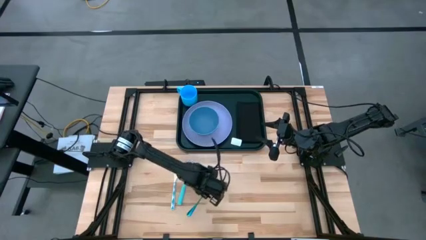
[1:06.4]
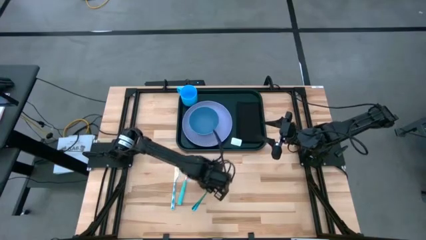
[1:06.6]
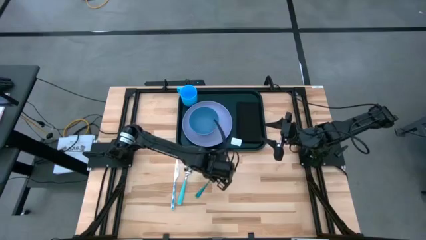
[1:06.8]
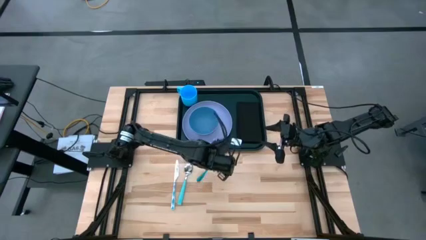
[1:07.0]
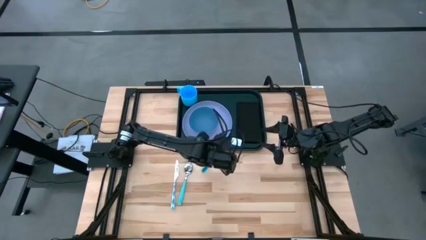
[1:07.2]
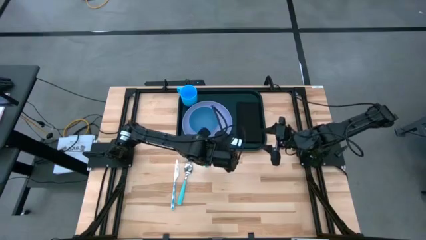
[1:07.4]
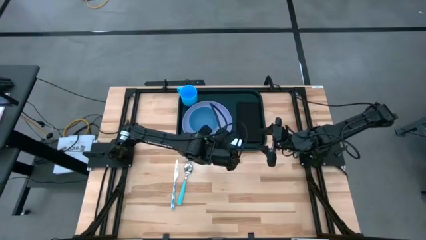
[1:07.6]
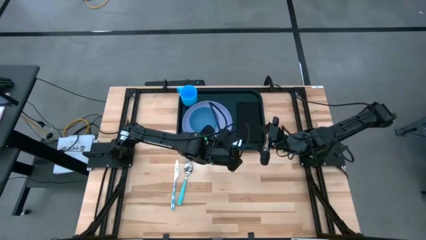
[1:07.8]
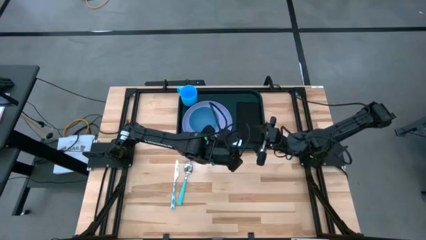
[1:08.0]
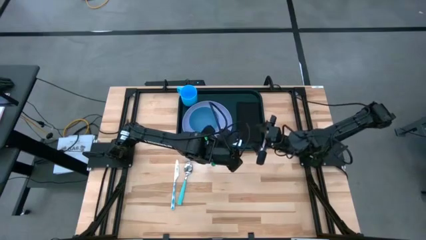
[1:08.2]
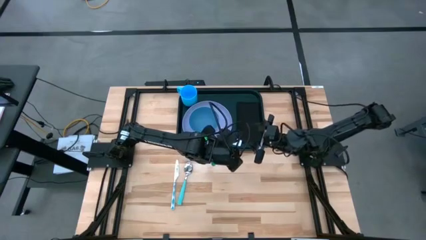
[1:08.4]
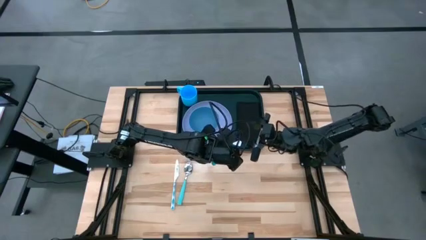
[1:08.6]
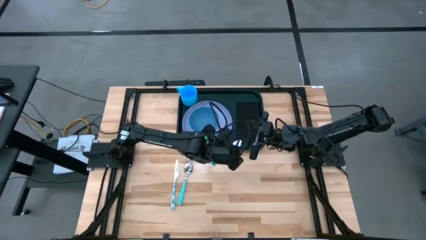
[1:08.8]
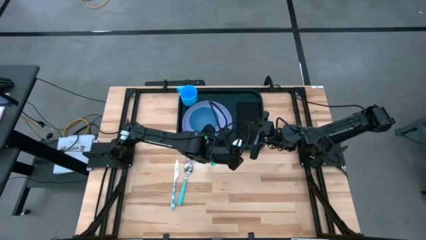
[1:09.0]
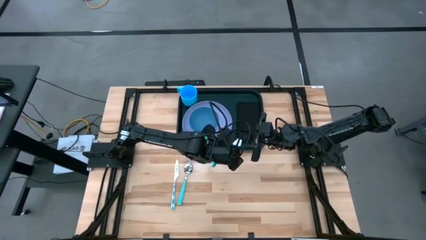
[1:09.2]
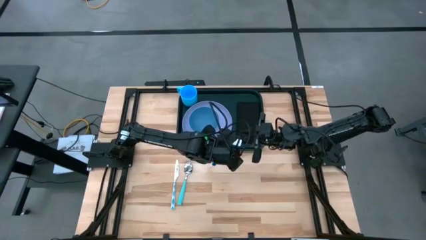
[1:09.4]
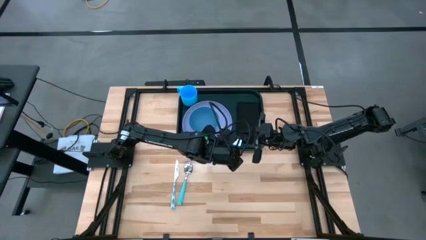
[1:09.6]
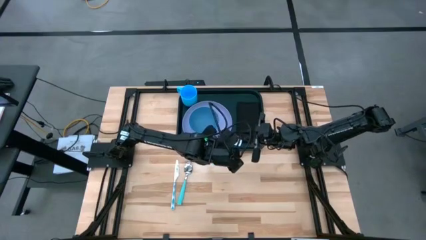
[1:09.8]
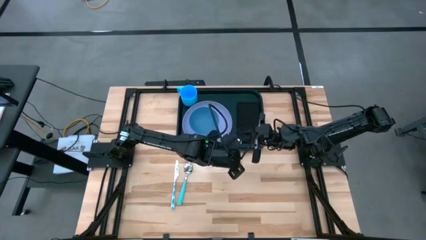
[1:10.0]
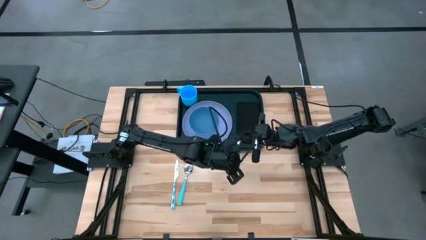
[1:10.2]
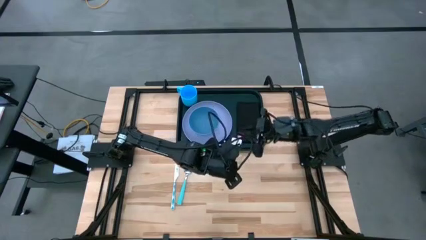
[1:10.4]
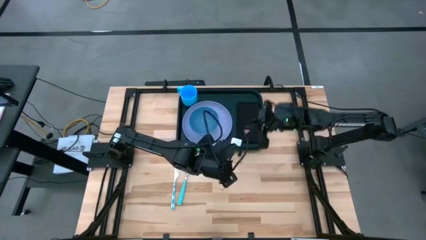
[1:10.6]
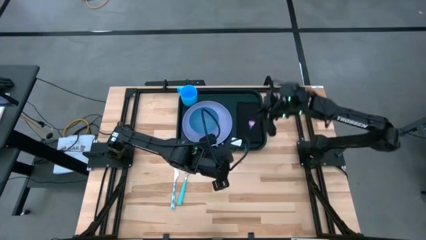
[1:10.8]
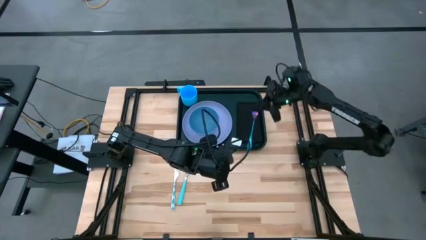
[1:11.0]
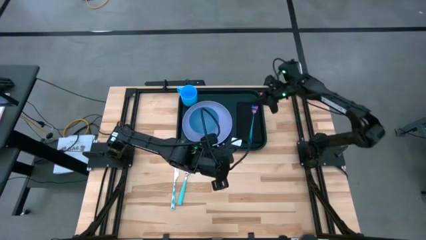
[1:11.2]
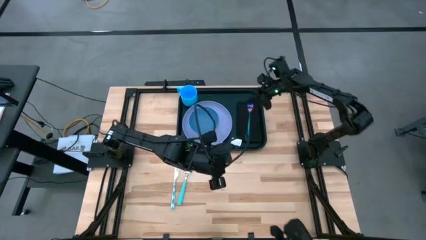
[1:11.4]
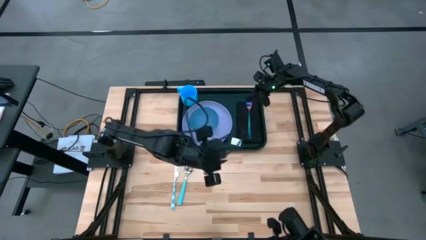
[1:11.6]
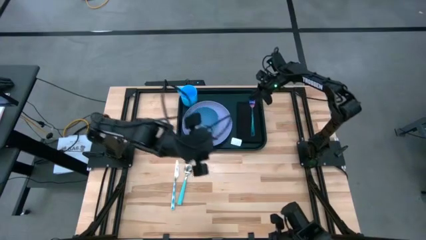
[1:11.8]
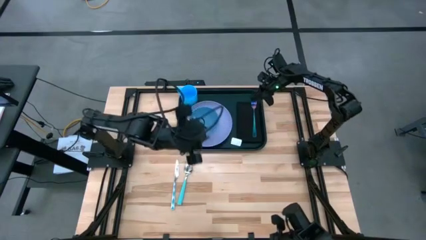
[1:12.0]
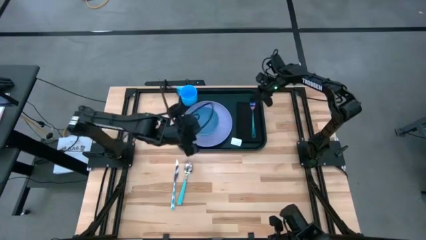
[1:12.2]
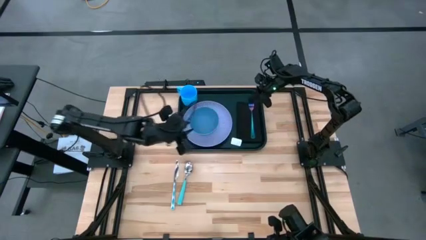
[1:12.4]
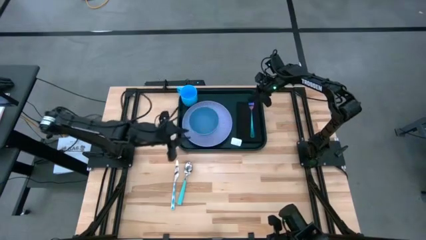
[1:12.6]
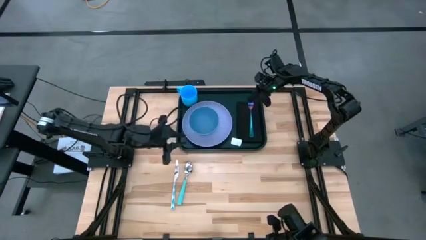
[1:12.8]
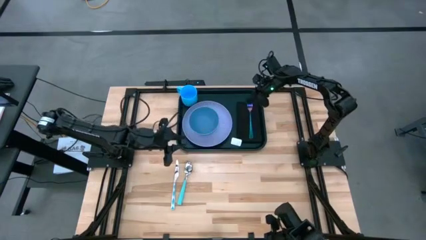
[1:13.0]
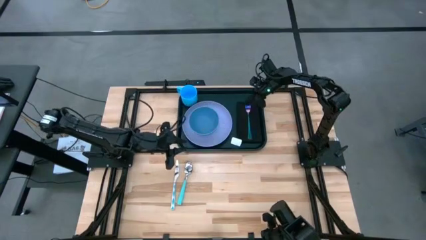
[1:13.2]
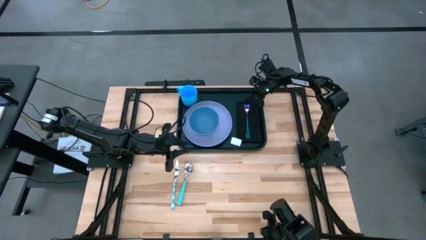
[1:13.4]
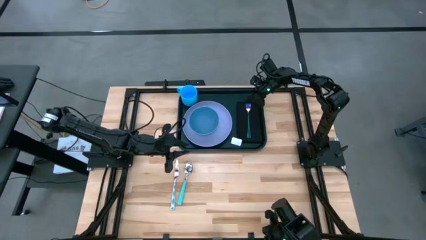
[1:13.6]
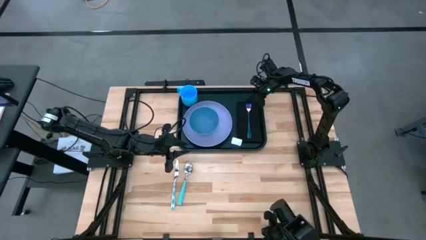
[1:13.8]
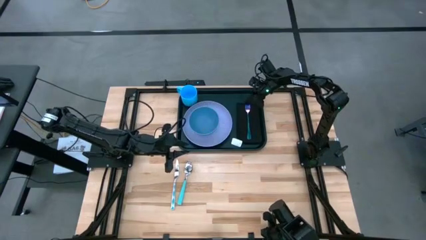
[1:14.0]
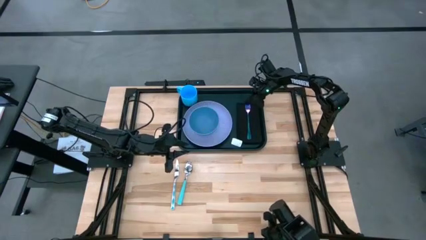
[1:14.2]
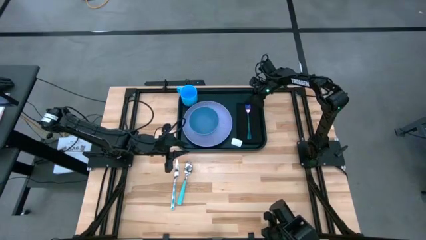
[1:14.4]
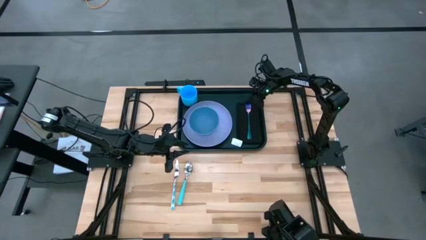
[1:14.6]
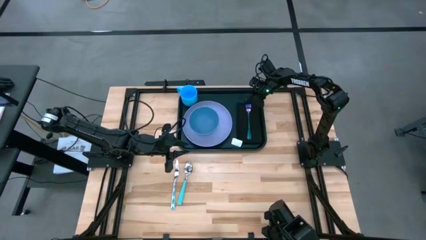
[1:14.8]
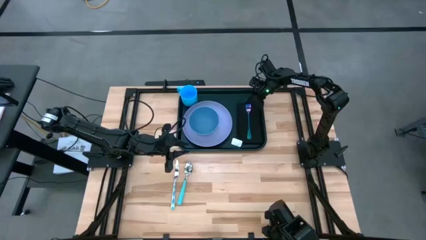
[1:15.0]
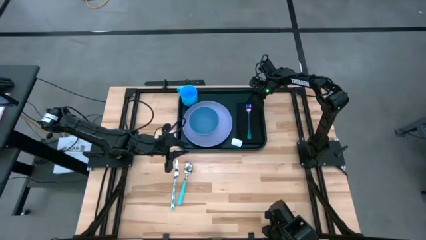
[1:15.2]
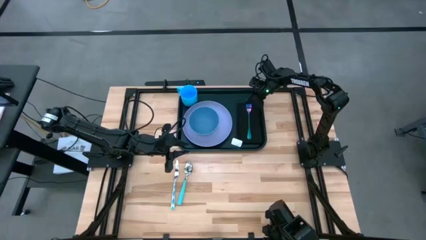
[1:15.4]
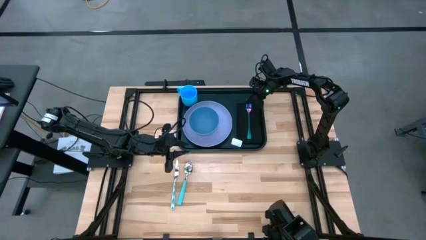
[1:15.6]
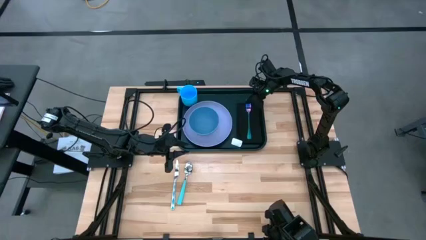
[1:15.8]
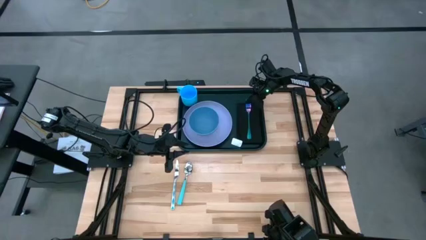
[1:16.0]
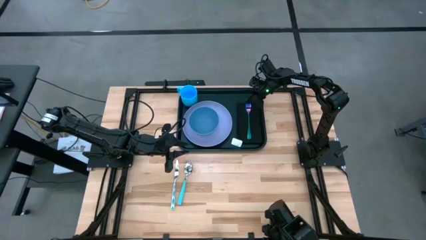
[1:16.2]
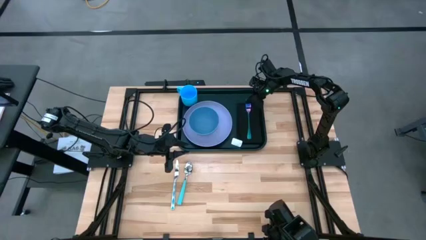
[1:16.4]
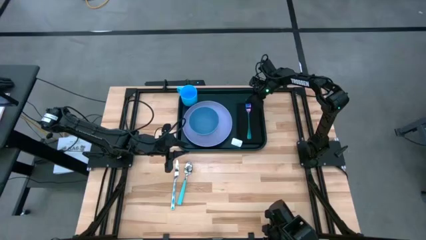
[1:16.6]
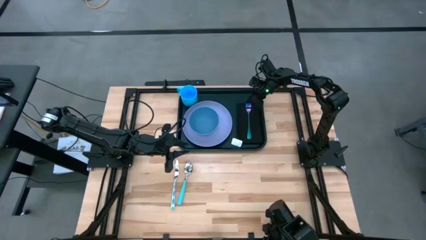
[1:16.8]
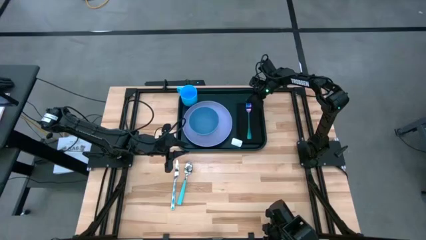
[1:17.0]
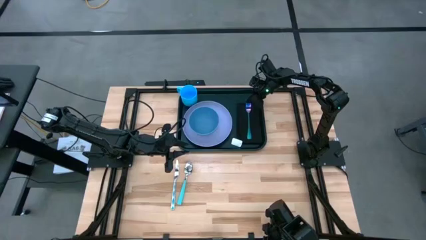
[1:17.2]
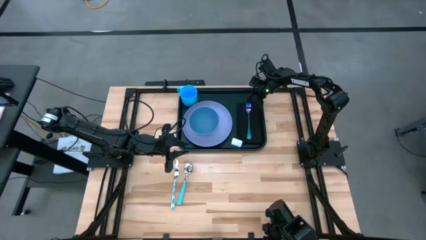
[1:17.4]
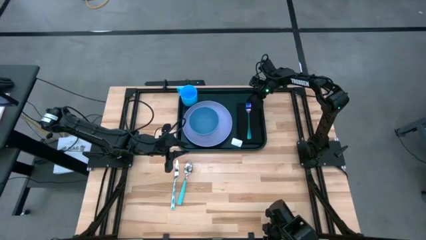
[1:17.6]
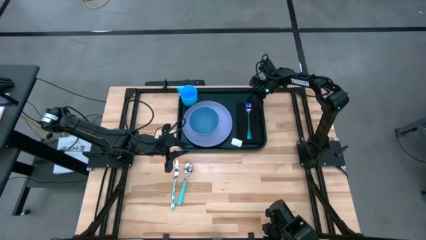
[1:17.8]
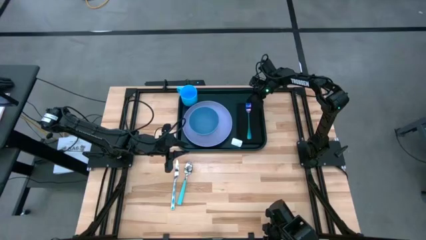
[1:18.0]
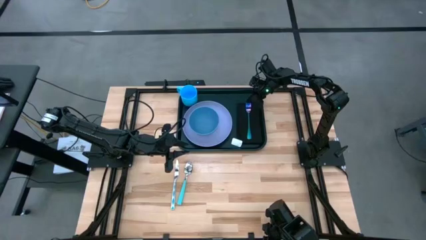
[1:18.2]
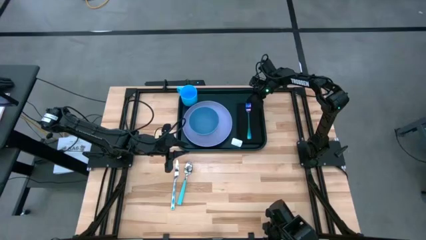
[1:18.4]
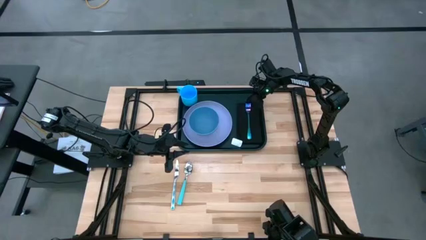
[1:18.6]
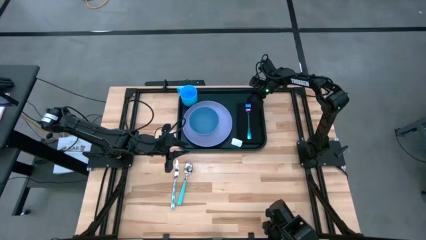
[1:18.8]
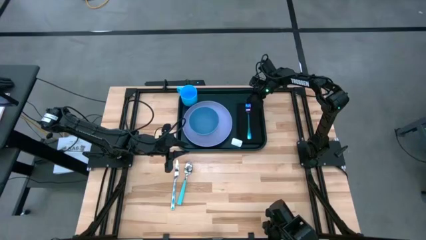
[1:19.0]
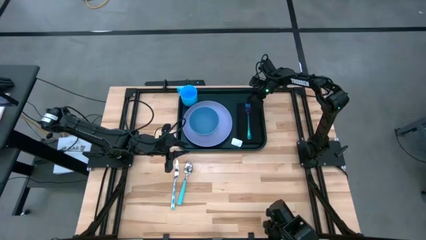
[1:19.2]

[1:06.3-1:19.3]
Task: Set up tray
Put the blue fork on top of the black napkin on the black tray

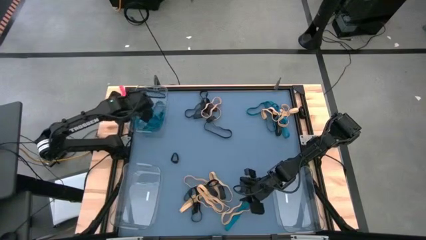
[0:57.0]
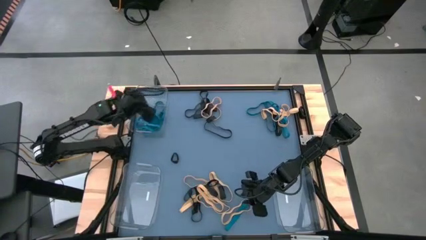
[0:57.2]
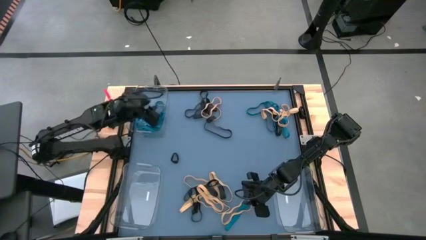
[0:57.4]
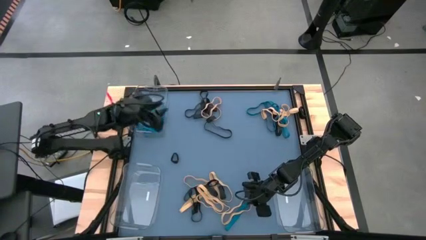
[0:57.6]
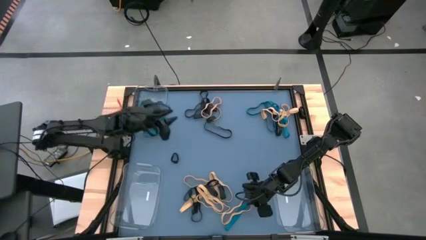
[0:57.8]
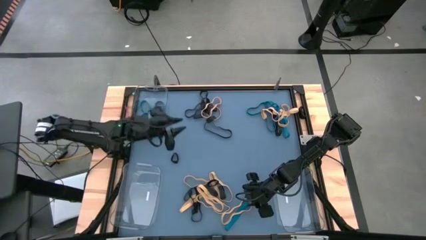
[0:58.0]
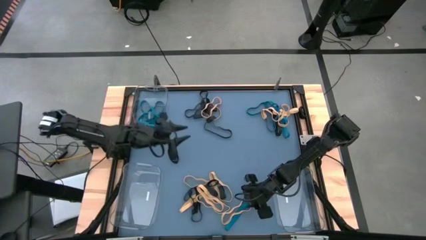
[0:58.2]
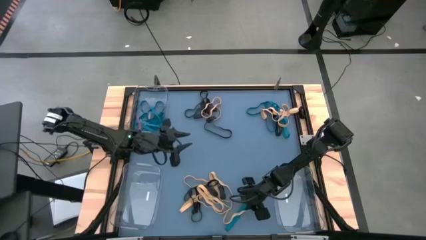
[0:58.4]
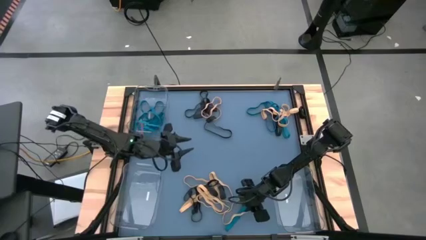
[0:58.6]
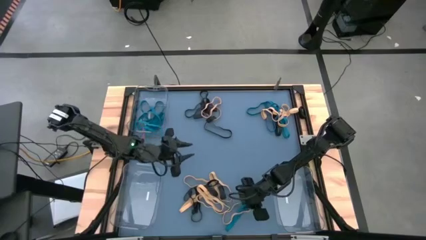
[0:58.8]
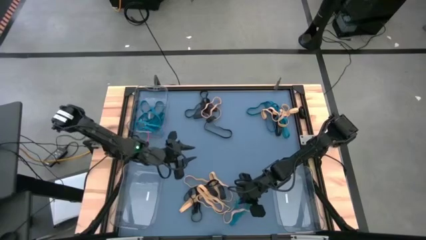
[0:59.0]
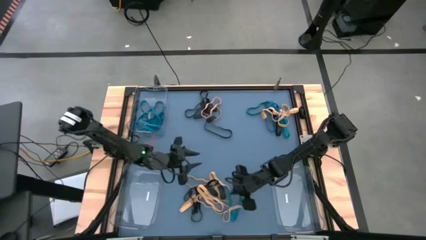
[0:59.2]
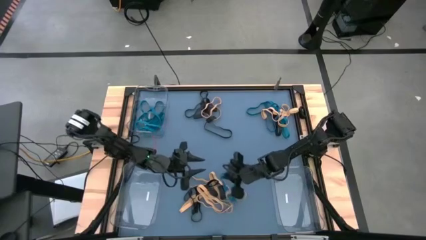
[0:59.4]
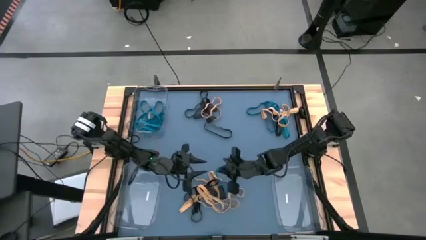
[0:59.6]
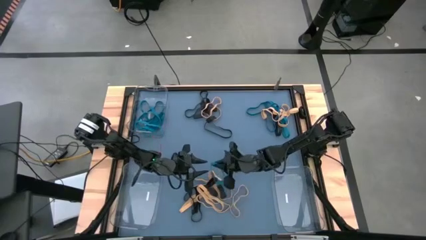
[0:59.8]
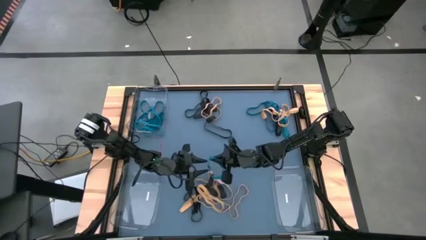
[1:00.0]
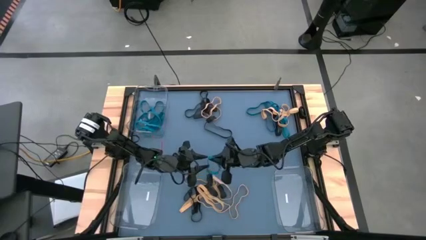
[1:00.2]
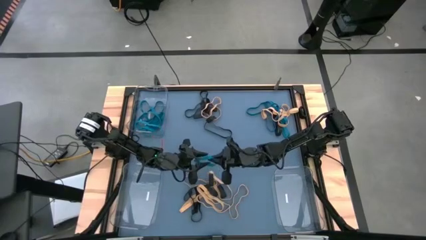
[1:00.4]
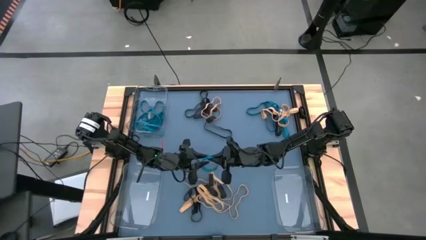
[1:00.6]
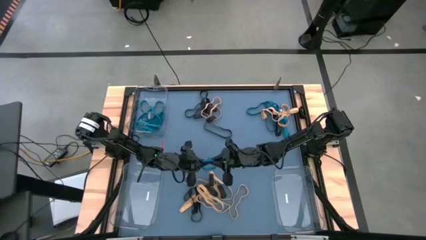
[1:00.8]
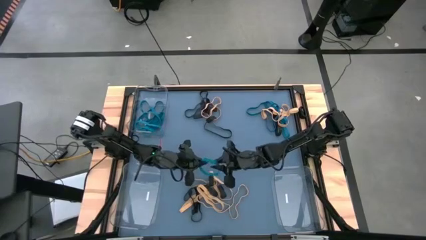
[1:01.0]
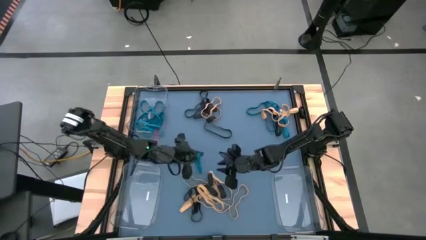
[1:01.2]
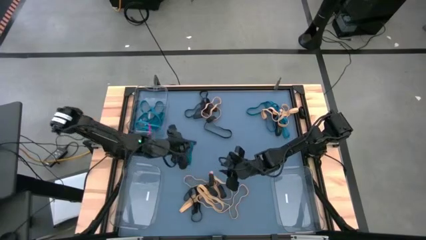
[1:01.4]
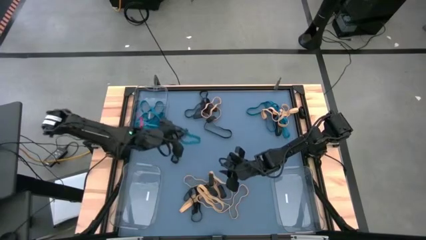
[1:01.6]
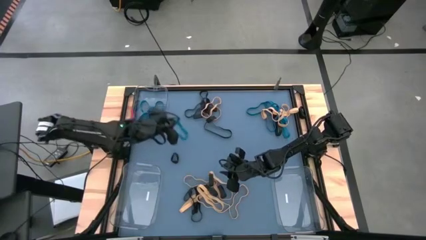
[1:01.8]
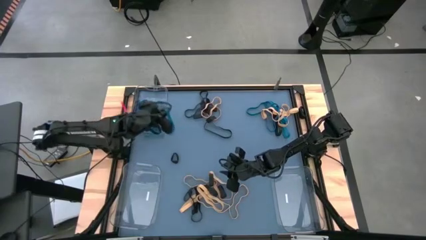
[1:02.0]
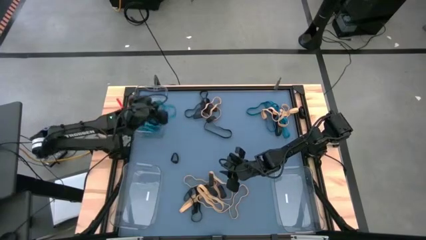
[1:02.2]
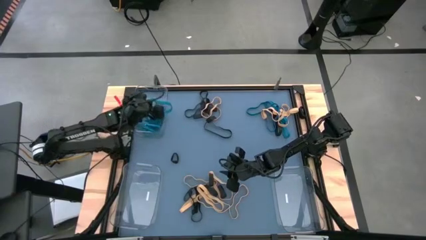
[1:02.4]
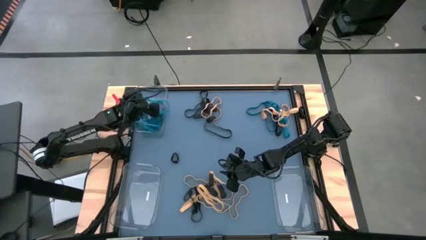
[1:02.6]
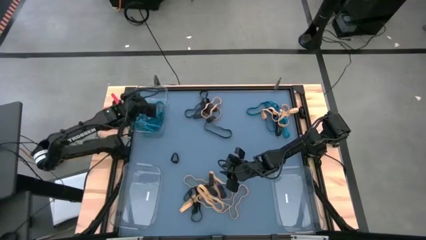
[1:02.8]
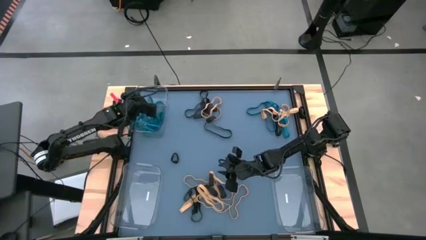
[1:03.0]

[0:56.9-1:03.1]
Task: Sort rubber bands into baskets
Put the blue rubber band into the top transparent bin
